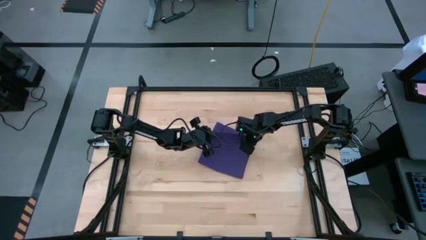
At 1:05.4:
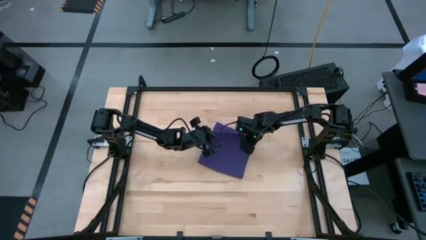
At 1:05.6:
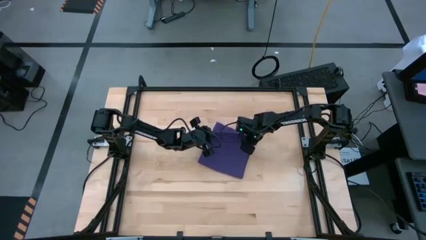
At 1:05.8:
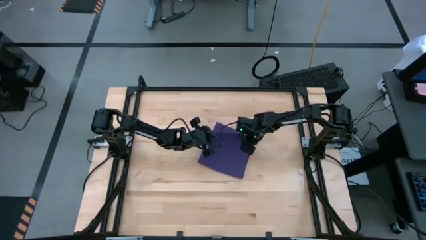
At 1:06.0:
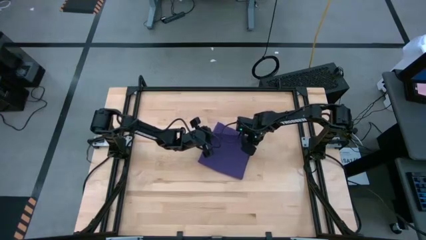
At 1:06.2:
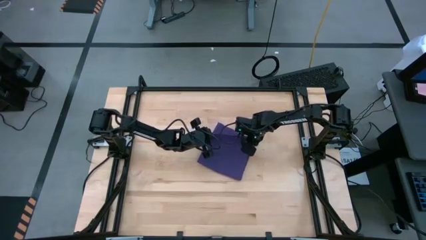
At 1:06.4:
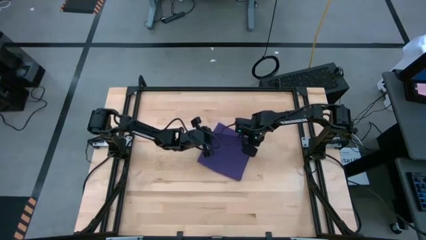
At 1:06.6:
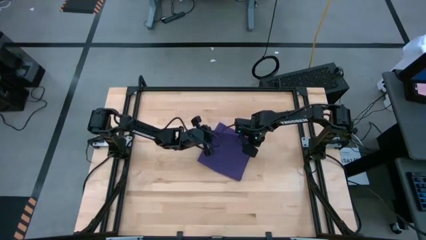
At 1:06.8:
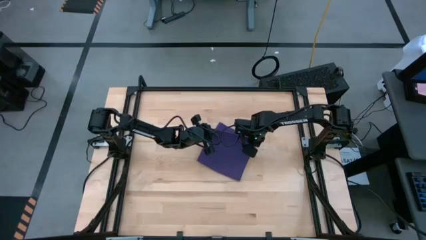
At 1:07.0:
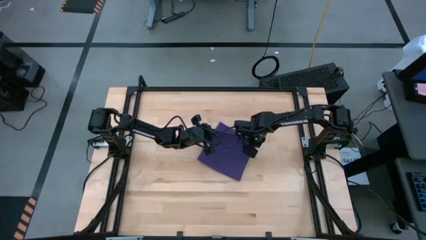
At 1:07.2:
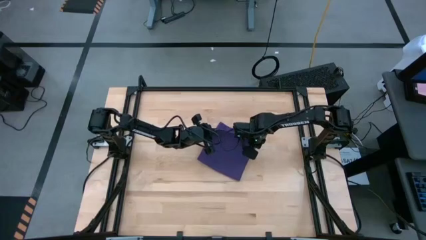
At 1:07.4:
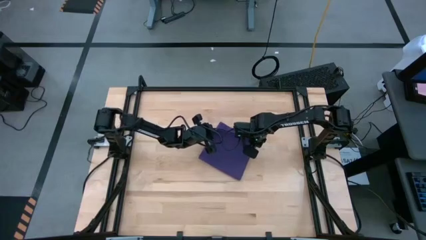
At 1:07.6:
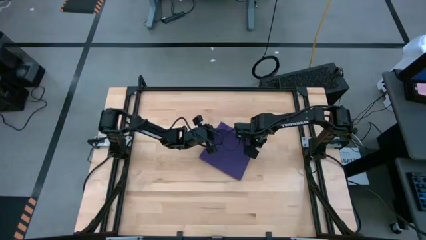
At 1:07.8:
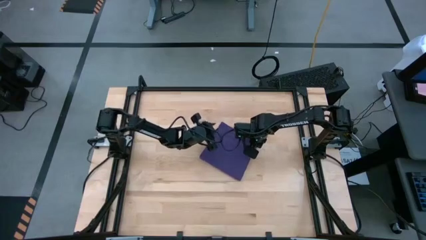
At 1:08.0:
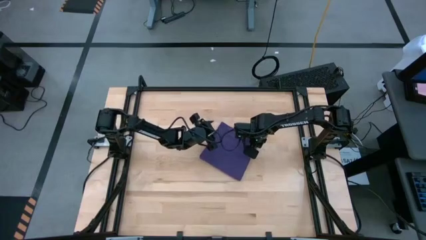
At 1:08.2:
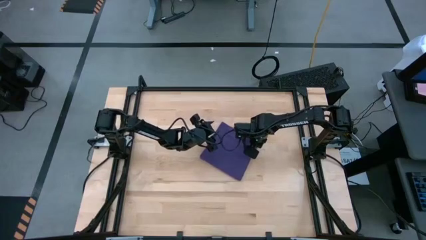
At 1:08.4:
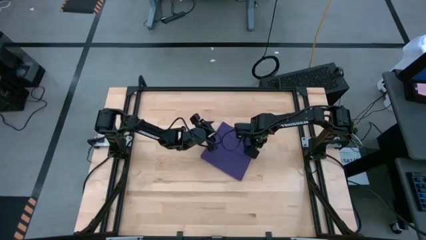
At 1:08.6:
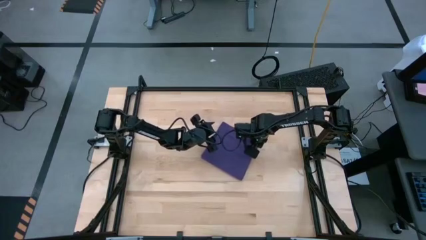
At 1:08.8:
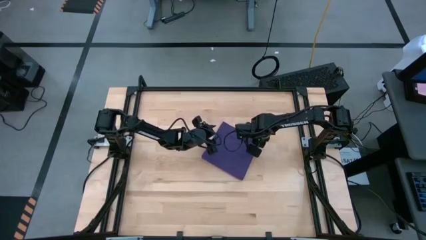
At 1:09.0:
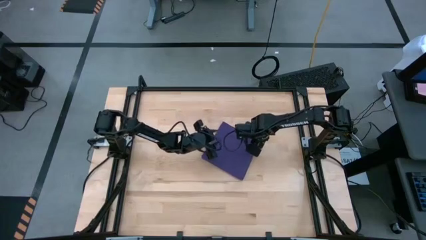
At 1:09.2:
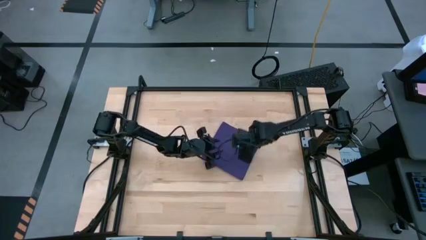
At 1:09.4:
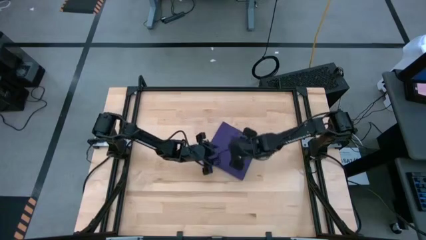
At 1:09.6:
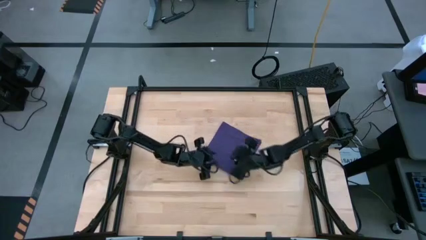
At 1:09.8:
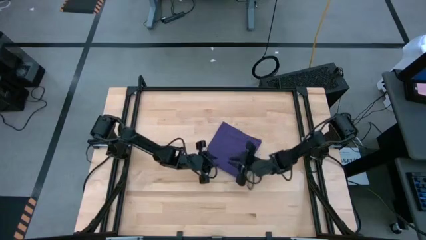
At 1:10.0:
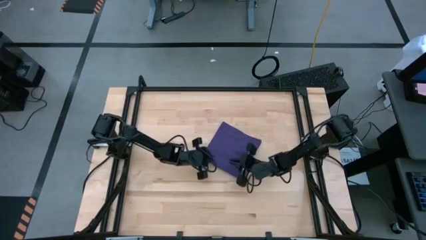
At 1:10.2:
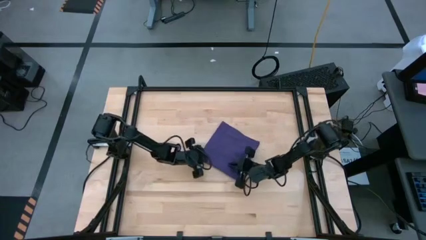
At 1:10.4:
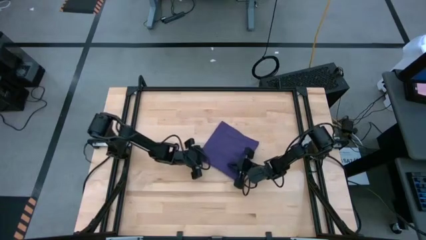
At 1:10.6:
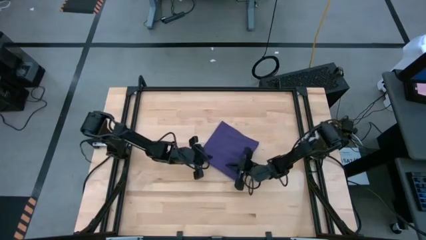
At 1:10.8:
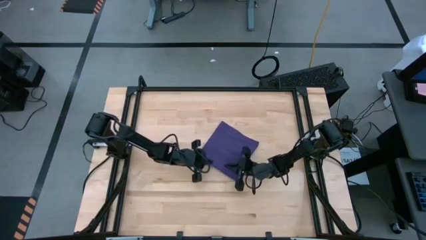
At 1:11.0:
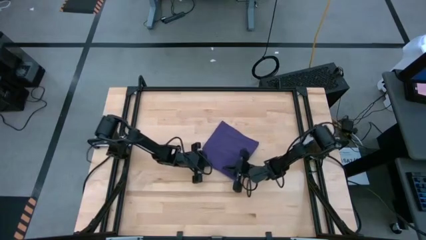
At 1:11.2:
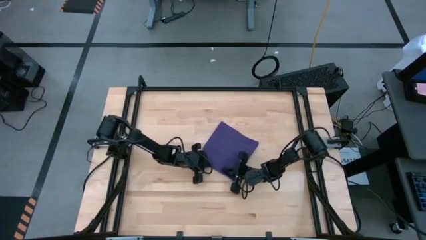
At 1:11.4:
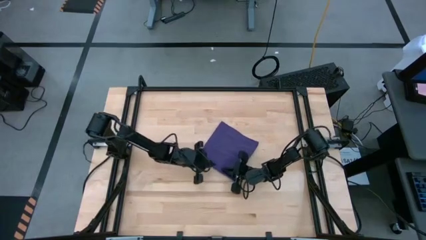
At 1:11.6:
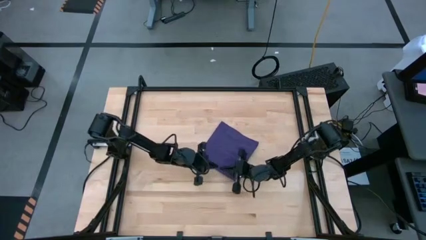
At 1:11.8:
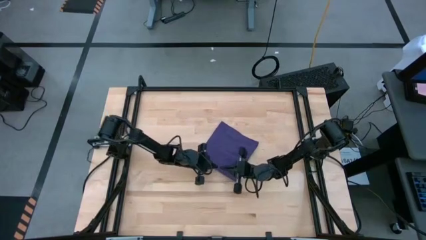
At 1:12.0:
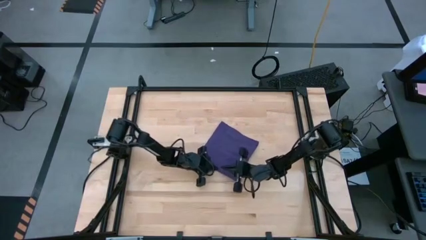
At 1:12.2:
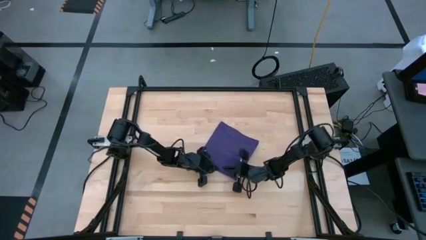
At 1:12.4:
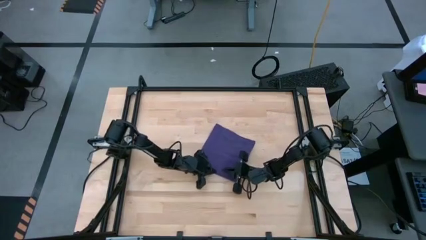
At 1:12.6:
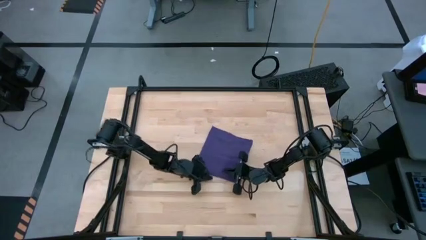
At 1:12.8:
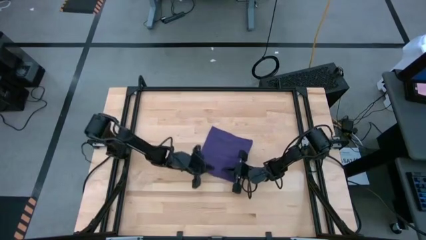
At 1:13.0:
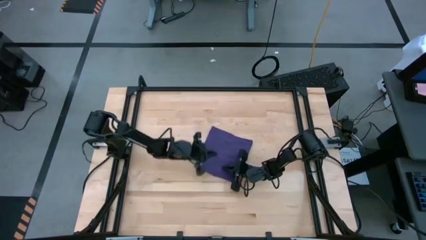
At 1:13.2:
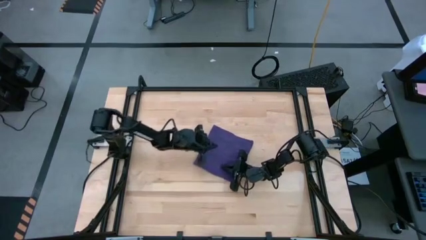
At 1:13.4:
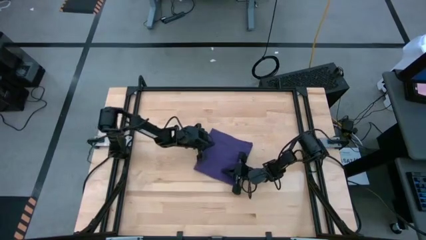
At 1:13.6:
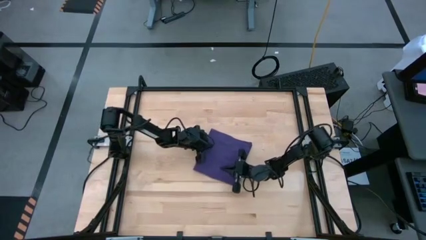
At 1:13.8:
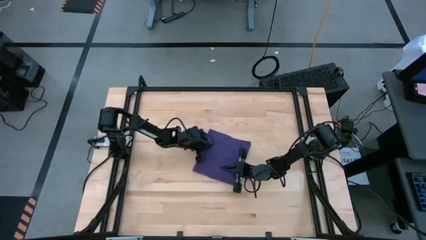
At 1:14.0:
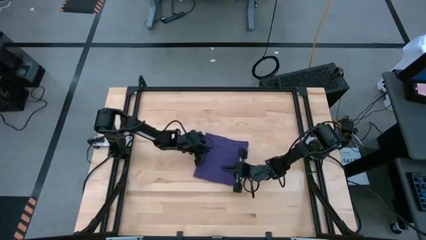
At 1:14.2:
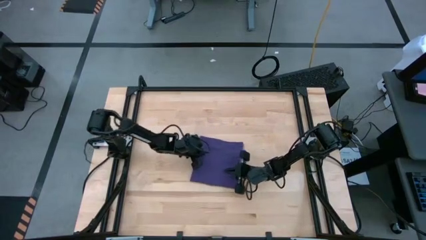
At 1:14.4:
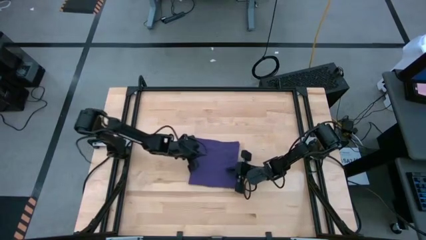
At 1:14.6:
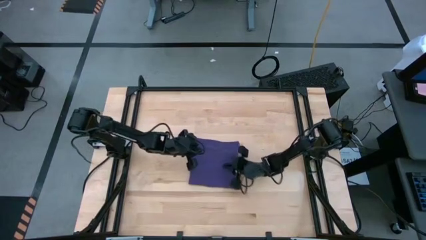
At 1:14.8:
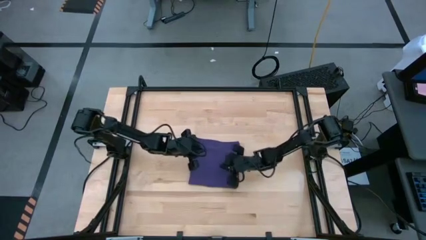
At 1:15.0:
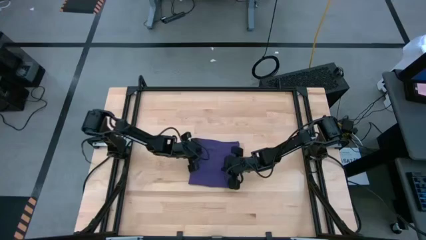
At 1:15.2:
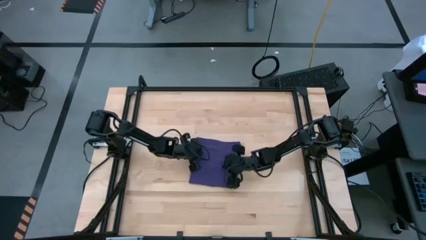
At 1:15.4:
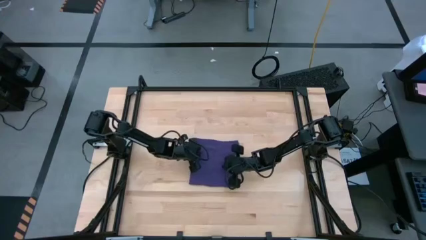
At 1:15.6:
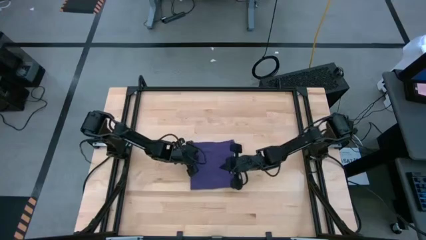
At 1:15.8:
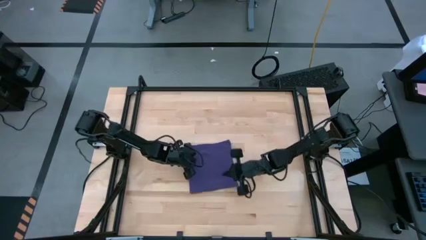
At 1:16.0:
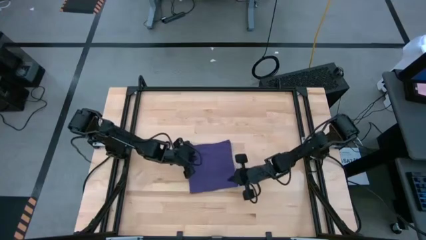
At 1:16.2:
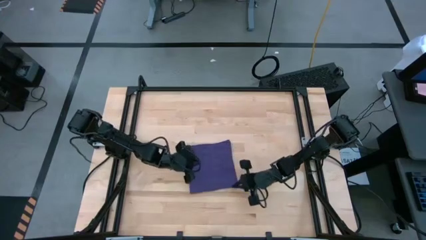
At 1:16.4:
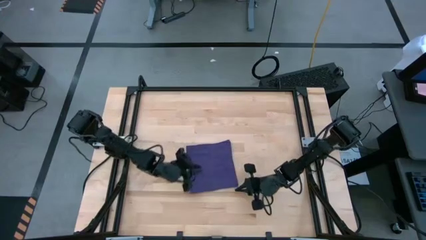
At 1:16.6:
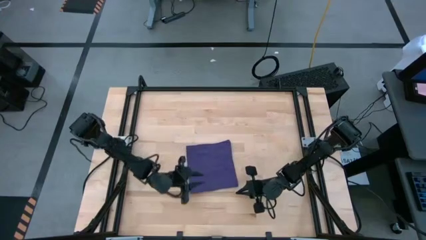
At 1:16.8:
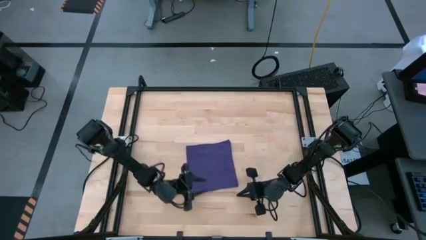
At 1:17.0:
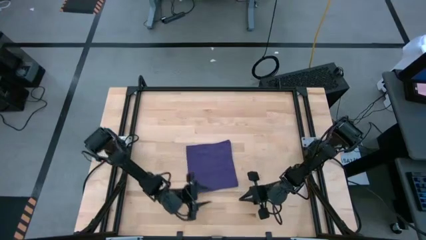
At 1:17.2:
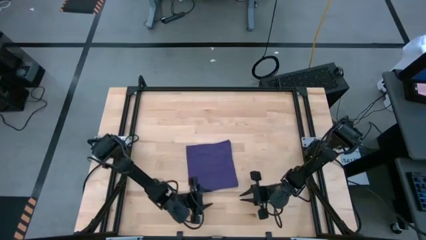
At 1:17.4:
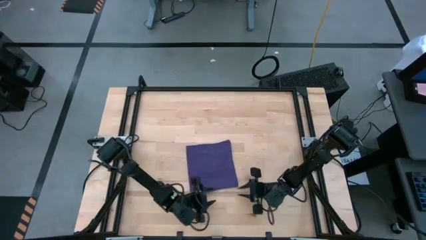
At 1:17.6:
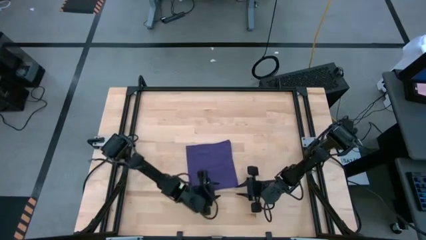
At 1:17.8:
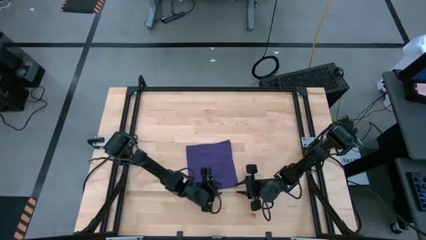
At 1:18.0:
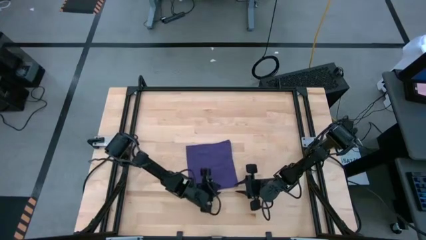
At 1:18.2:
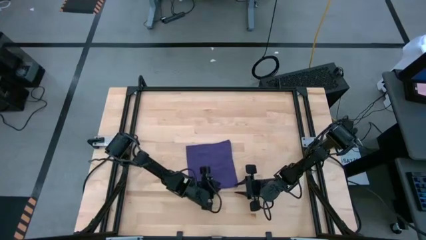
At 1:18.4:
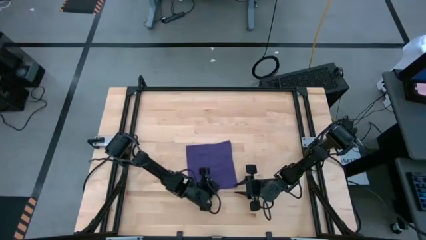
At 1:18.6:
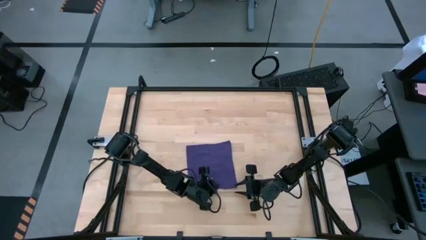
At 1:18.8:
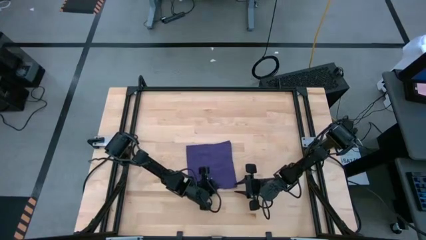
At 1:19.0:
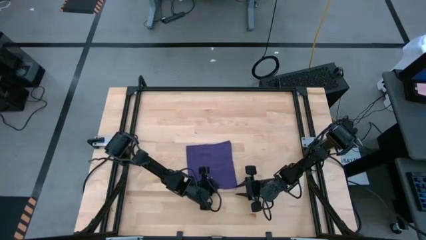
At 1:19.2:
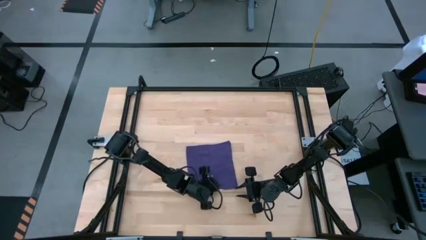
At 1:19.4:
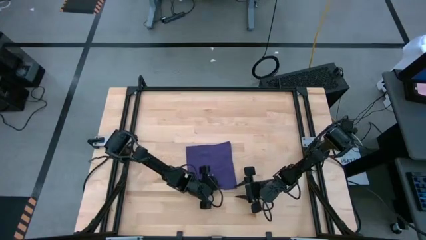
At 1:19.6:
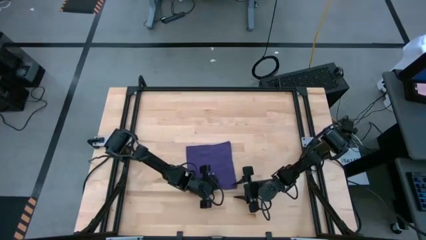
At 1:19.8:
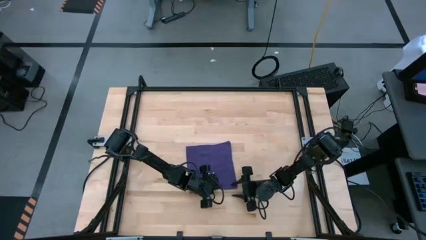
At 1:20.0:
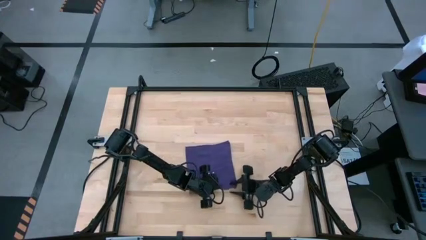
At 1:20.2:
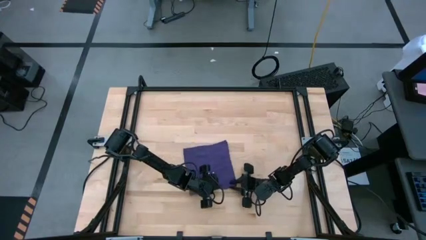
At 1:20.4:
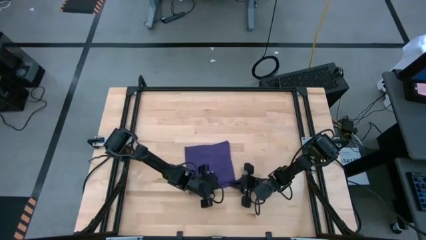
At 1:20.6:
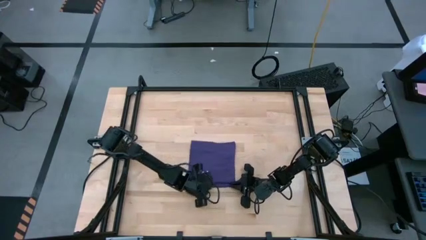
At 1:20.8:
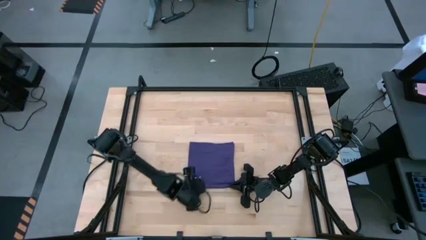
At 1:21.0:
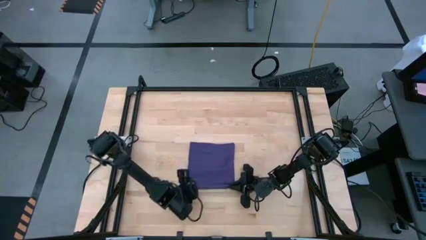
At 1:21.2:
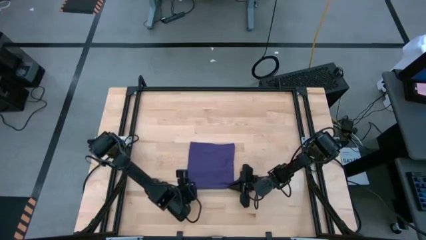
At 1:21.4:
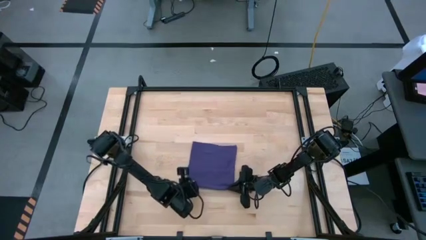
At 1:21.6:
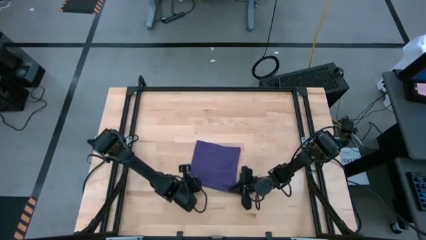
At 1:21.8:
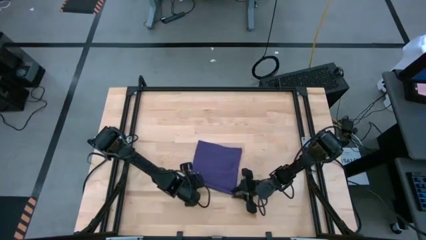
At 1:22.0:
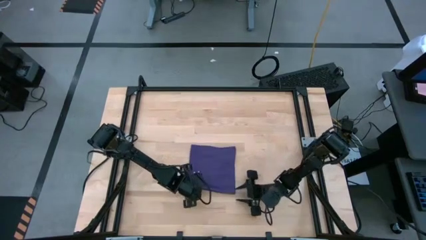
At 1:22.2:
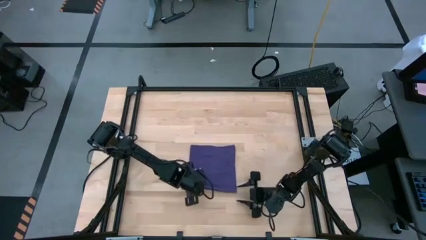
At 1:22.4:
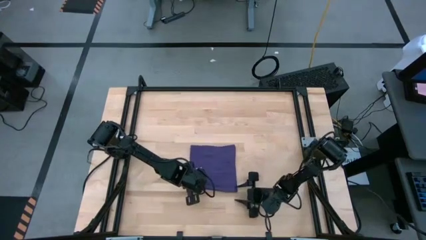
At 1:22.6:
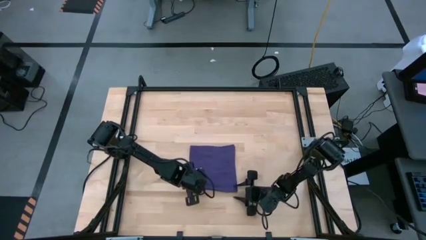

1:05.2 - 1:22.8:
Task: Roll towel
Roll the purple towel
